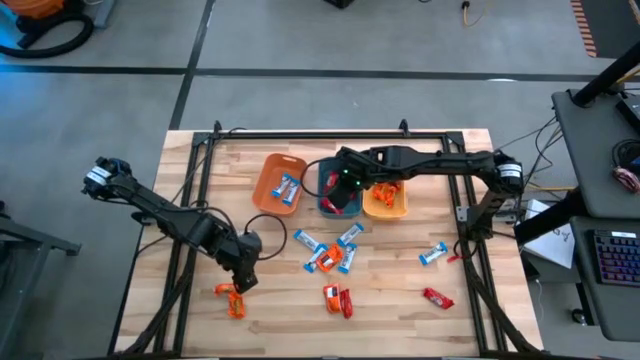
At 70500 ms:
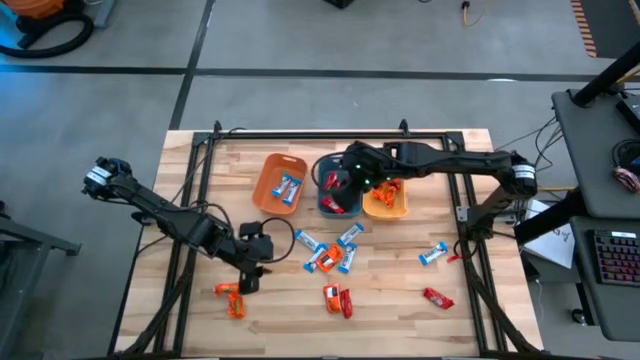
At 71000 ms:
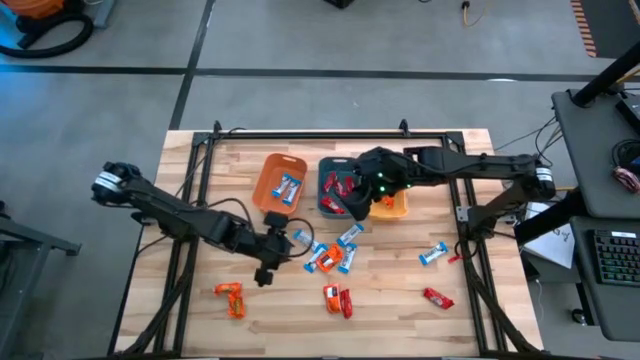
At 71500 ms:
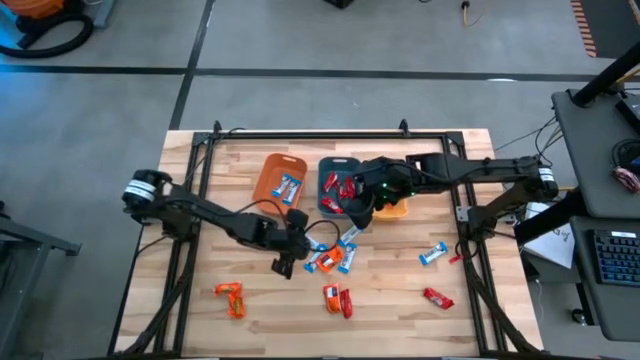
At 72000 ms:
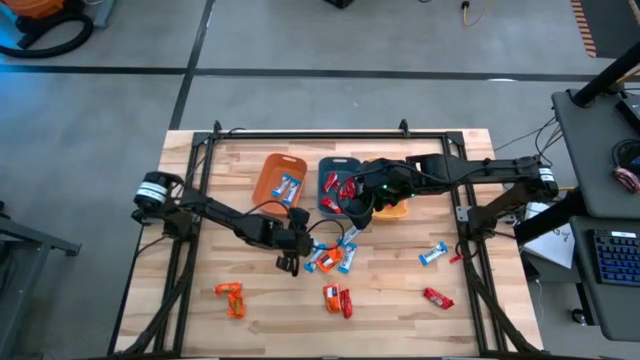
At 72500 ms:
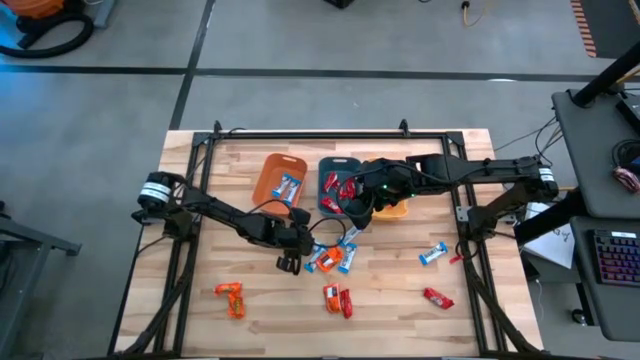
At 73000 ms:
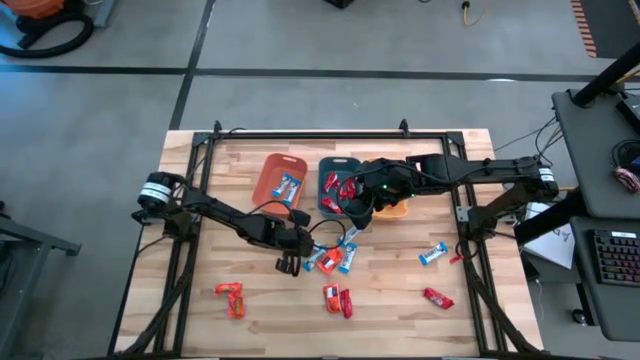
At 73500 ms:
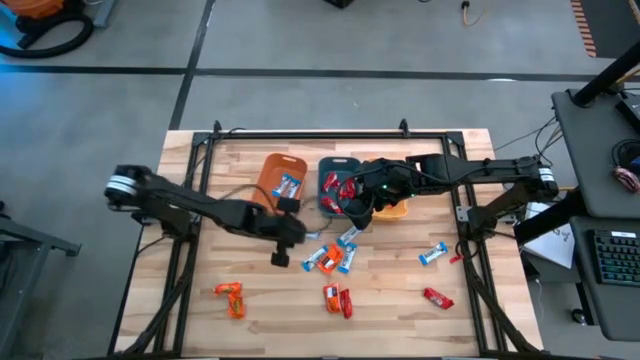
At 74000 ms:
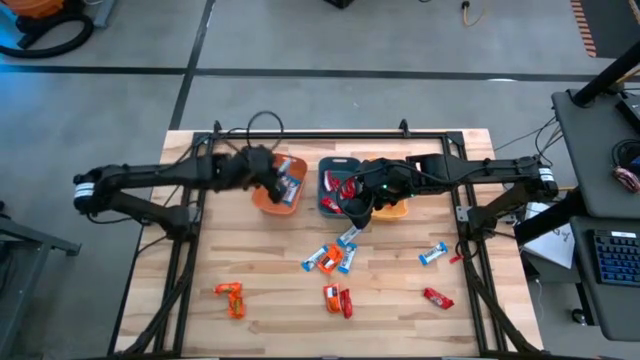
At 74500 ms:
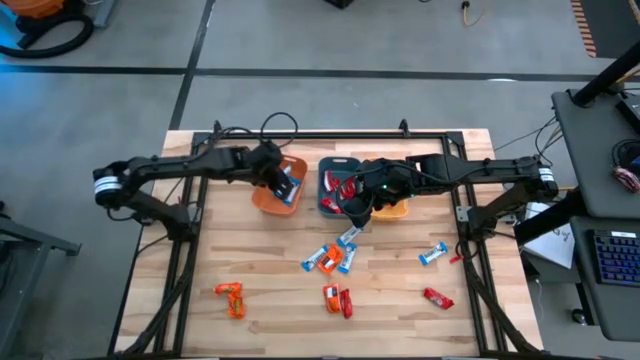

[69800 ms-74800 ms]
Task: Sort candy
Put the white chocolate bar into the orange bin

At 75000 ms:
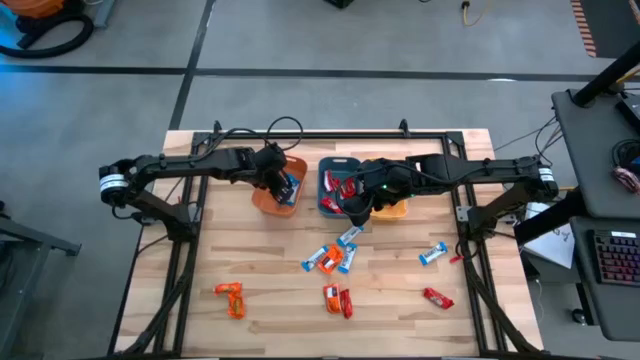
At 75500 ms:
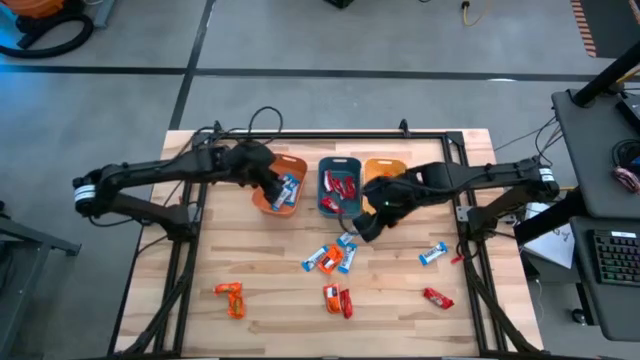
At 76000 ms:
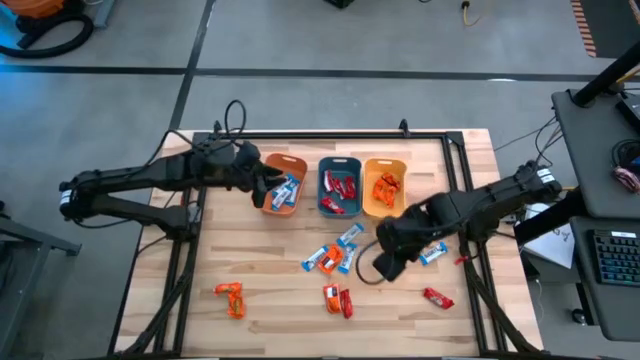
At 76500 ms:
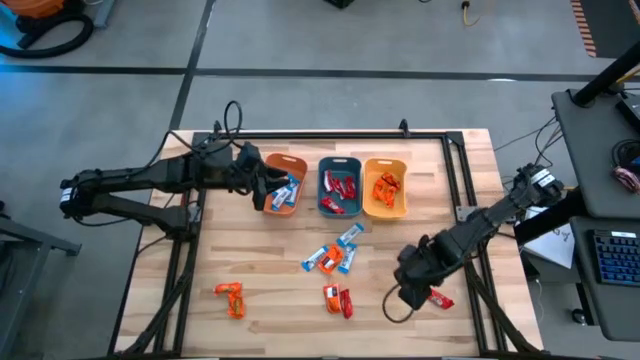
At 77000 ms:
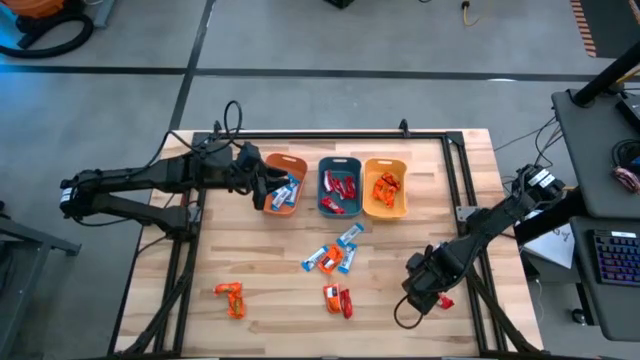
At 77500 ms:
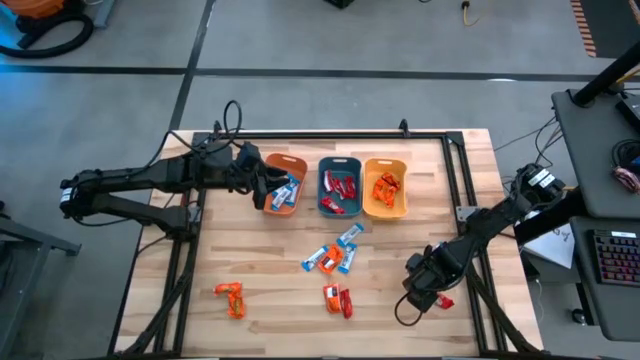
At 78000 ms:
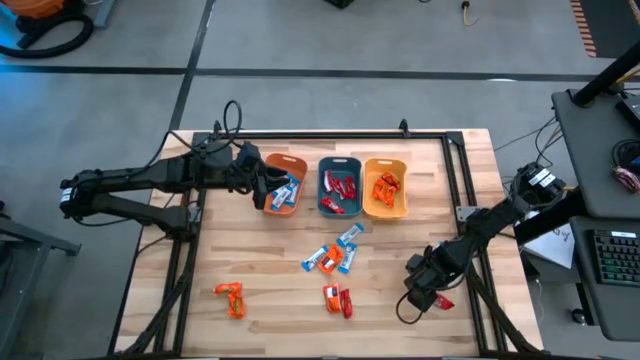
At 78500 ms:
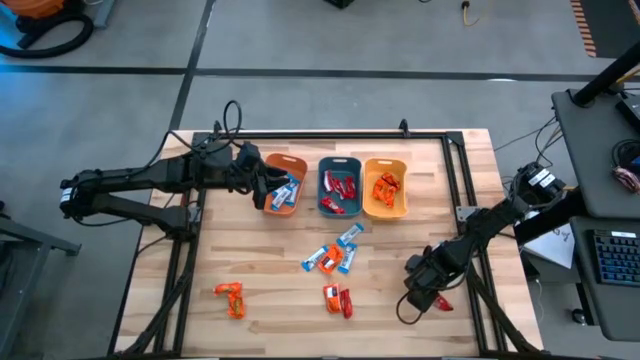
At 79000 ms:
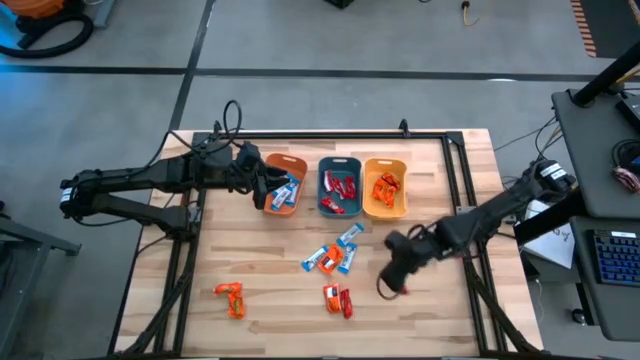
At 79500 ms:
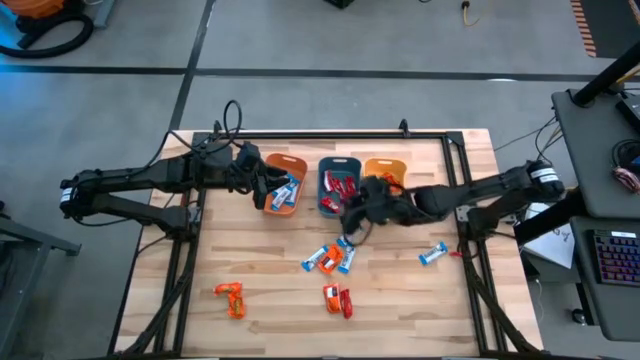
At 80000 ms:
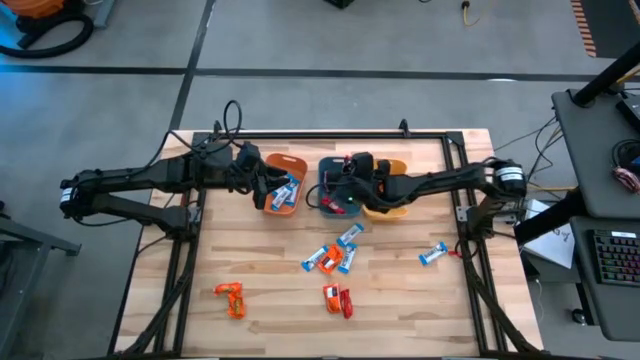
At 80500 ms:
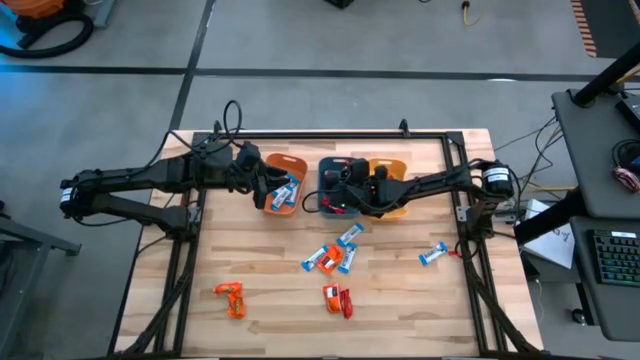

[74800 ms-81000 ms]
Put the red chocolate bar into the blue bin

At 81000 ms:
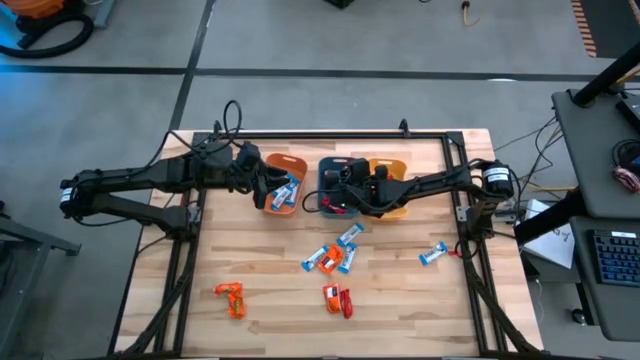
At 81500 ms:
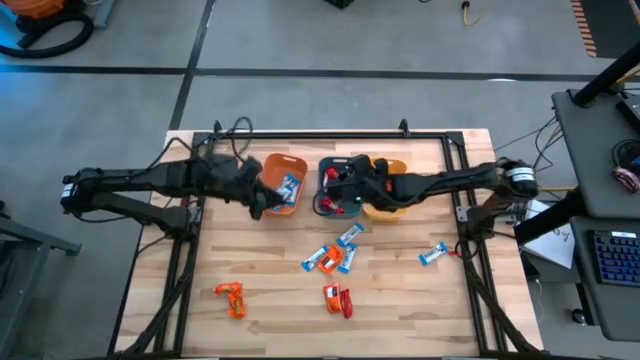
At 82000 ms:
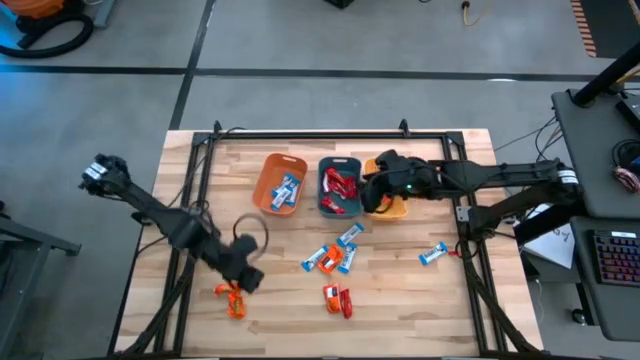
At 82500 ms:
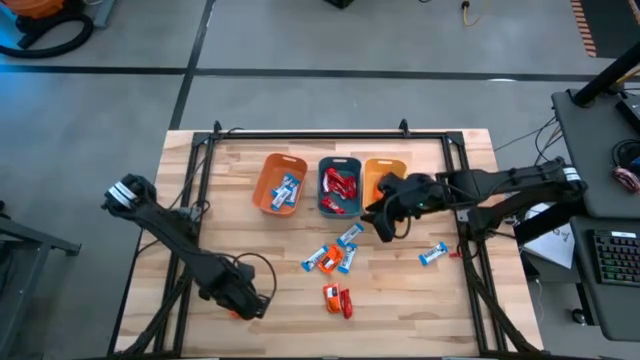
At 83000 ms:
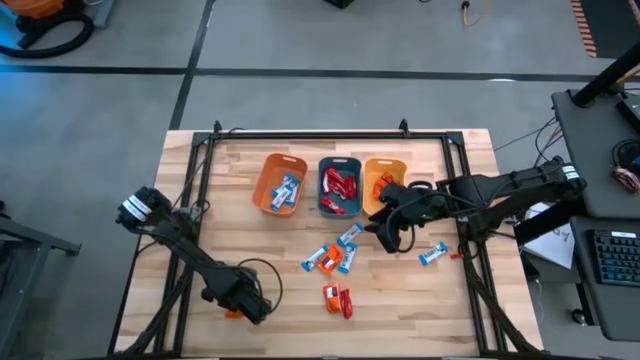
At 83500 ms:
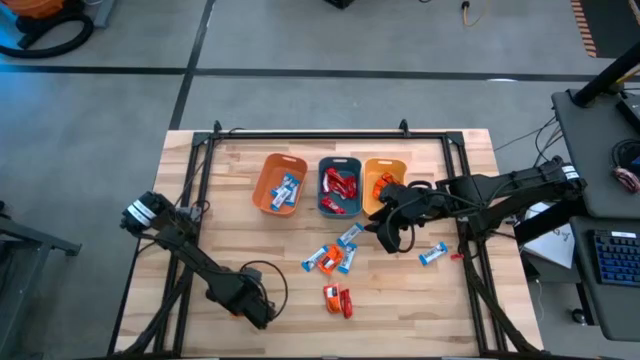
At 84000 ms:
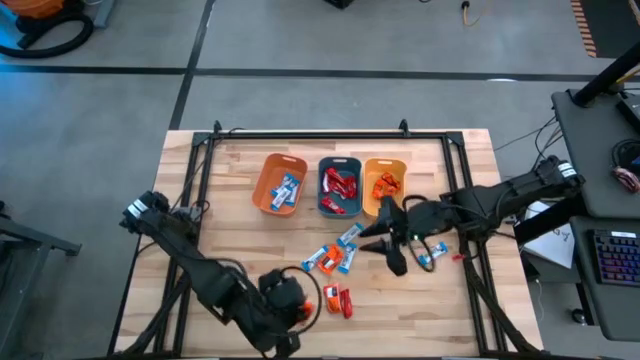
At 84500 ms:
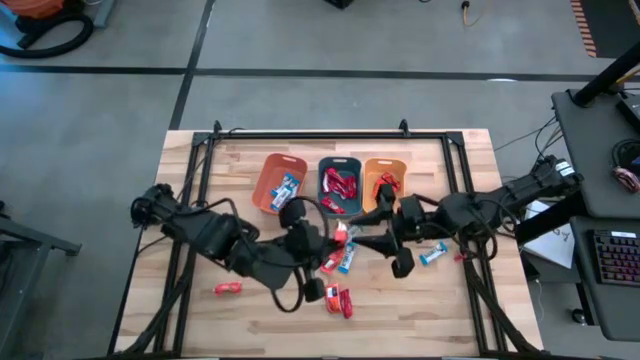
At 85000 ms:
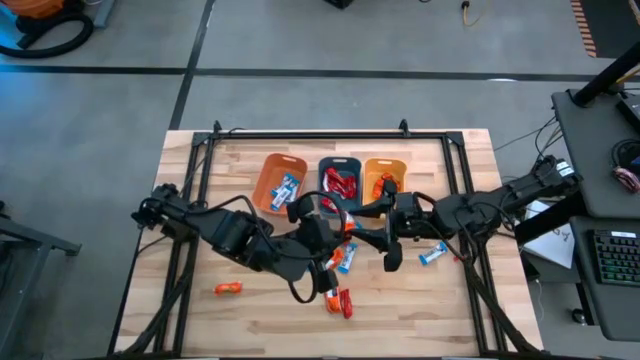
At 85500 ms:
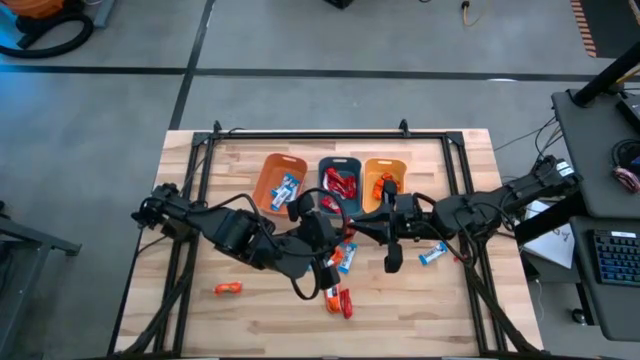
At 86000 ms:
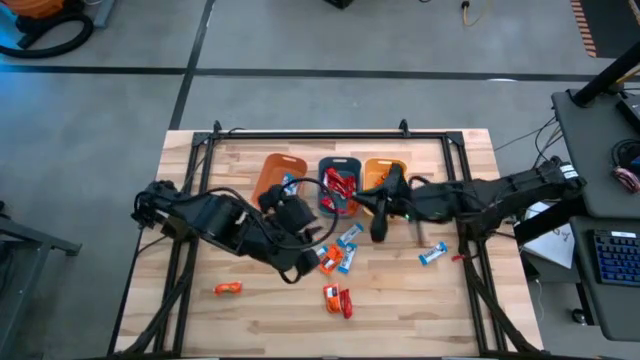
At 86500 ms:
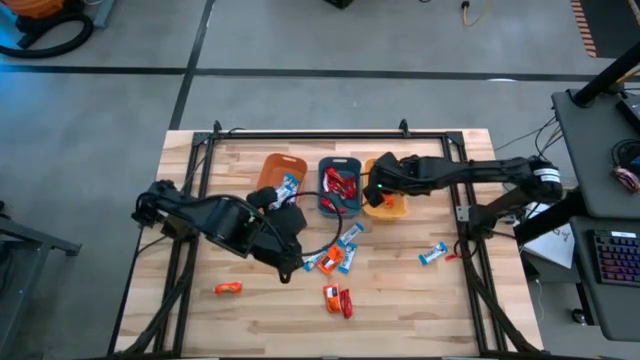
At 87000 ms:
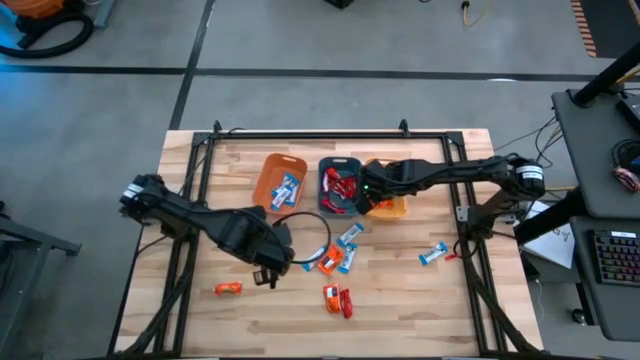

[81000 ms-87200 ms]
Put the orange chocolate bar into the yellow bin

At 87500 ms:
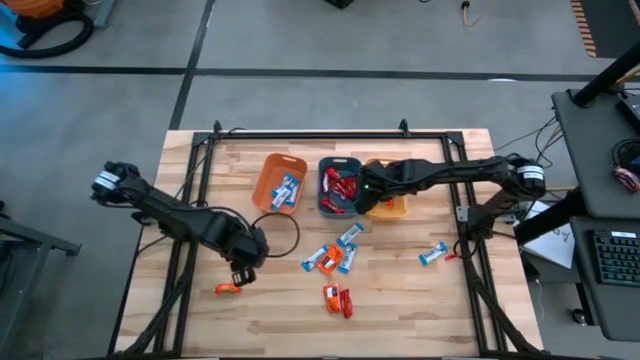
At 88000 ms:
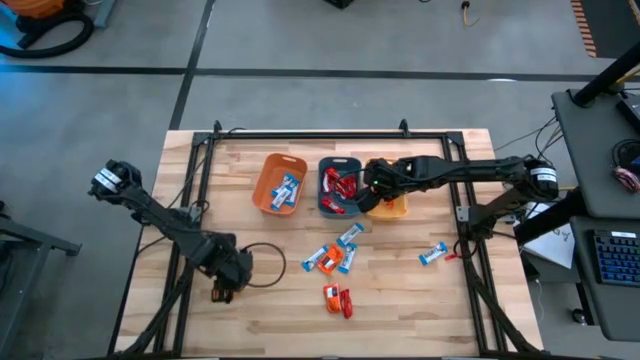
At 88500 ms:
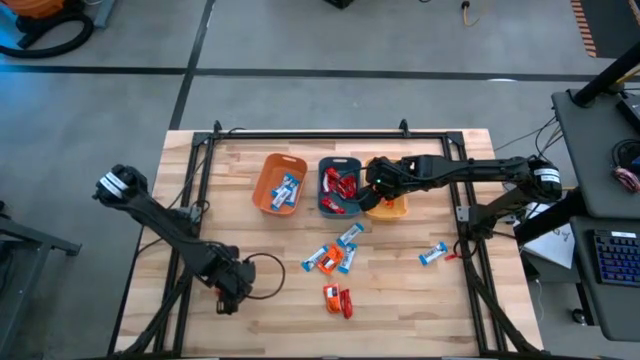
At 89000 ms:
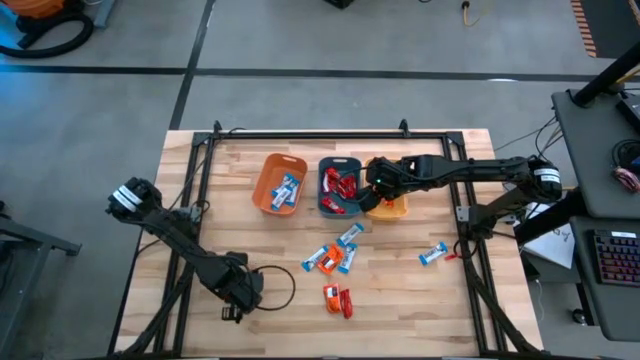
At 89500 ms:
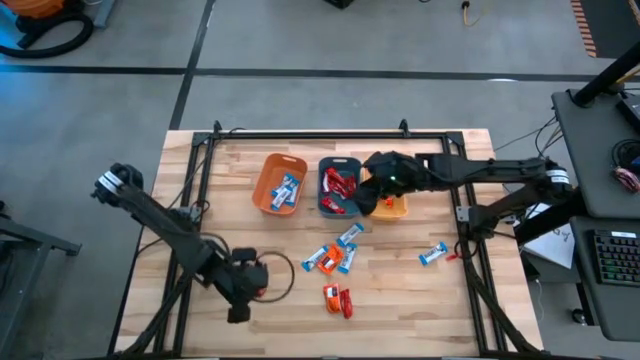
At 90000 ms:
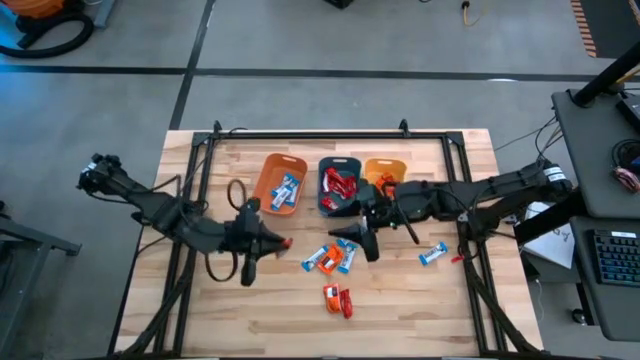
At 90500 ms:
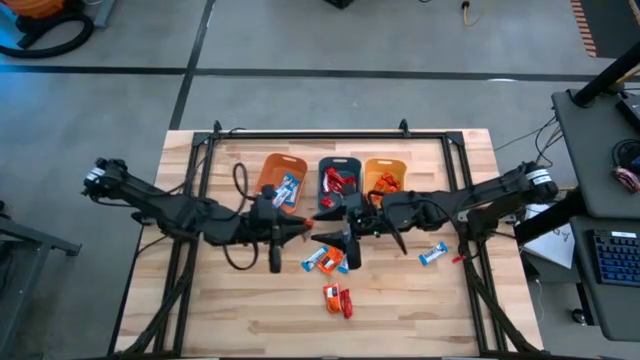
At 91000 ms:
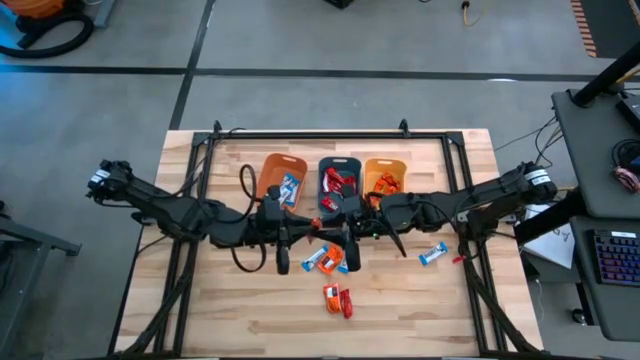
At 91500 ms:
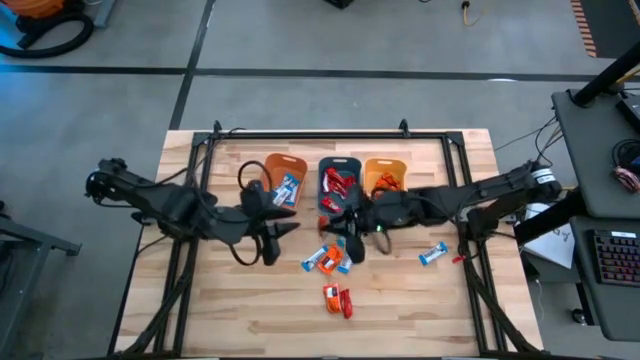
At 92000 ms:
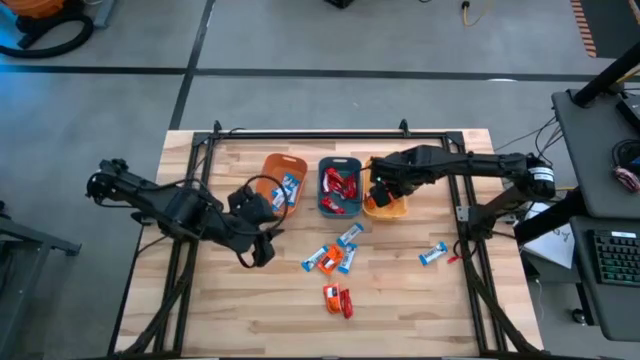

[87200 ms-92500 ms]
Put the orange chocolate bar into the yellow bin
